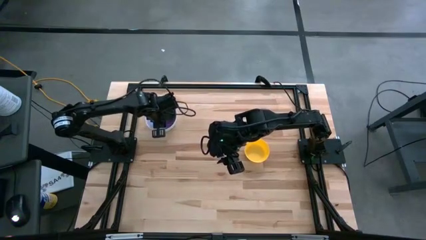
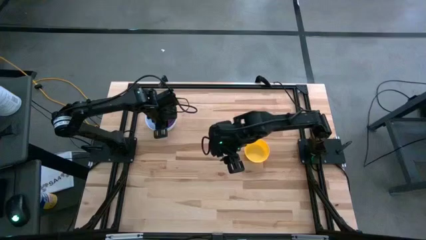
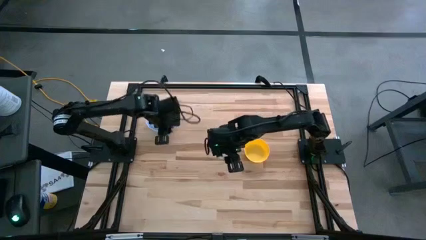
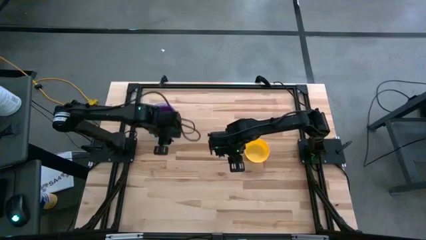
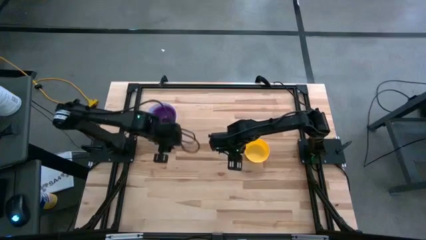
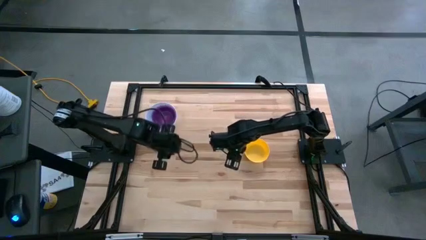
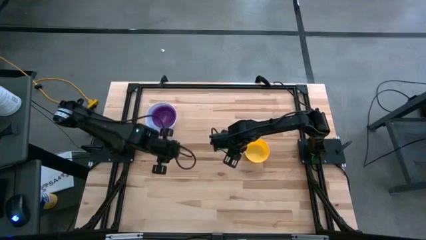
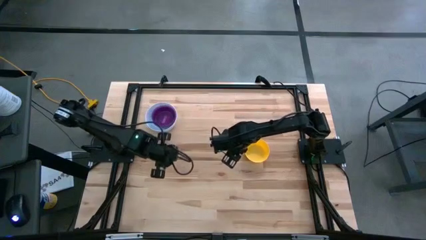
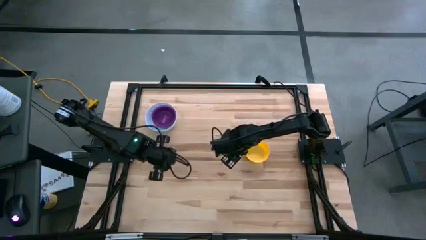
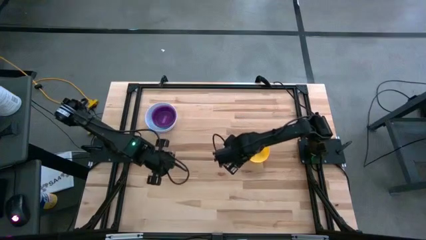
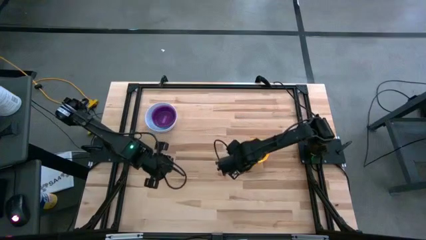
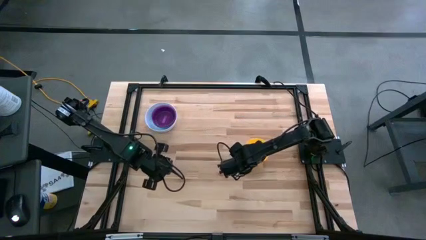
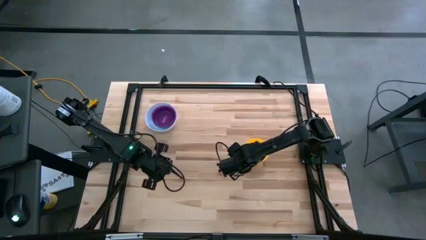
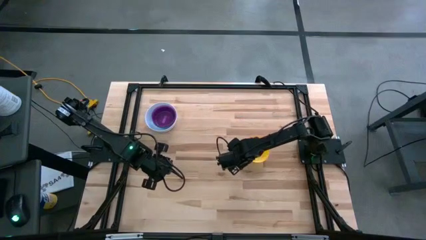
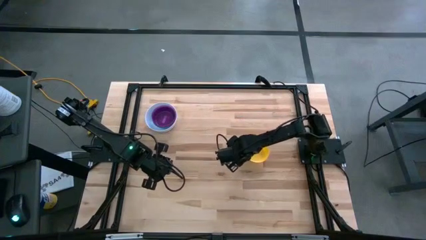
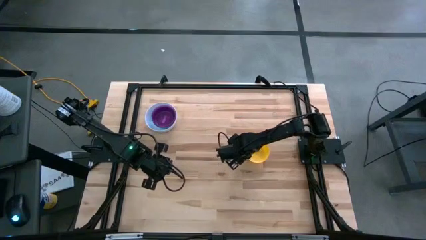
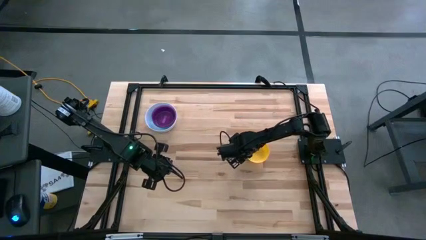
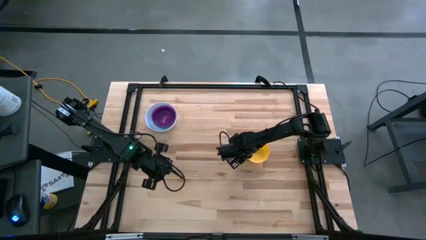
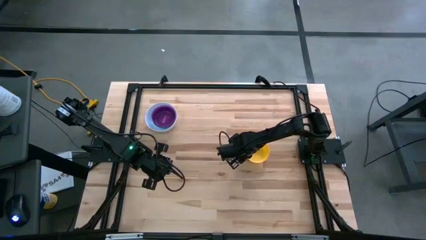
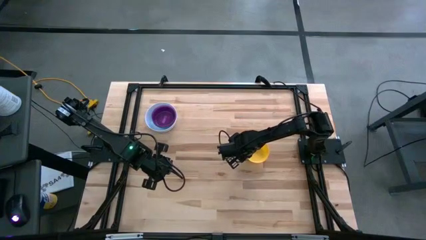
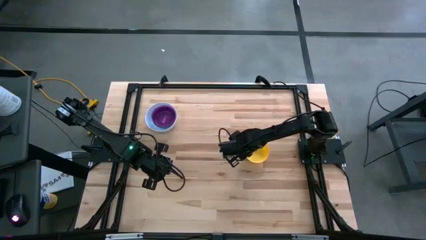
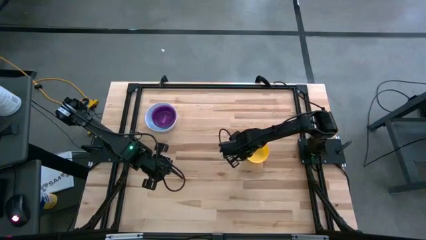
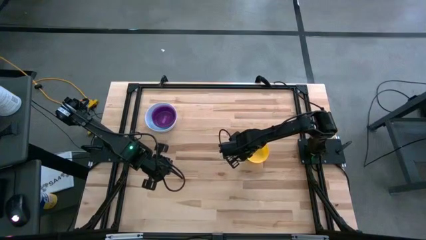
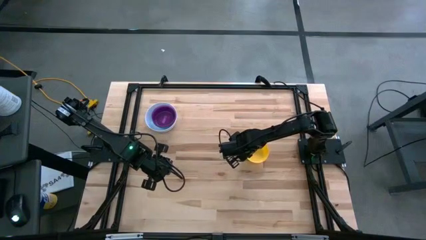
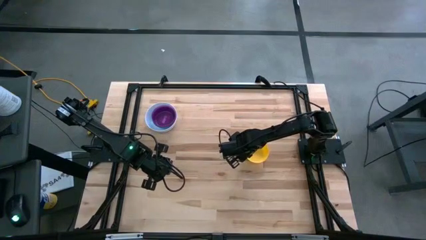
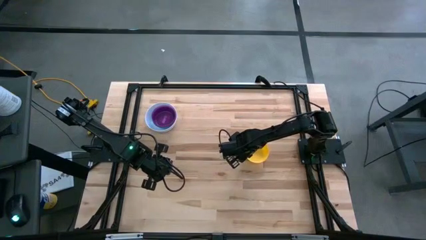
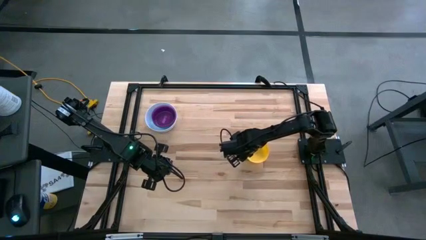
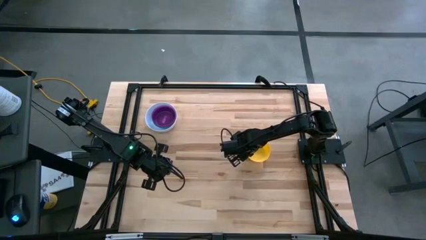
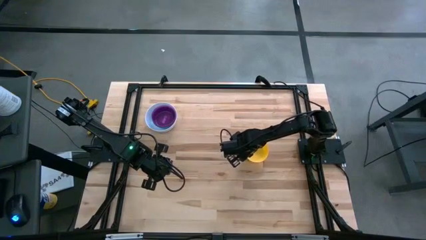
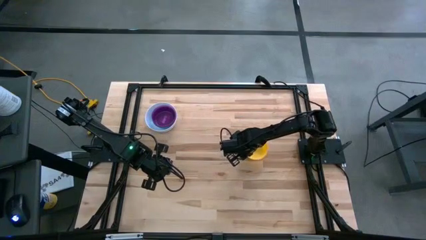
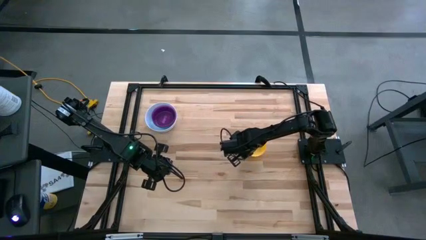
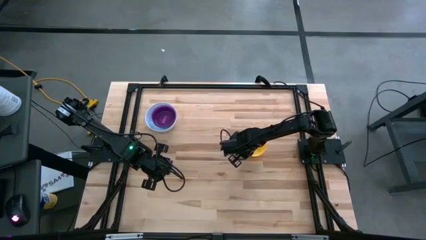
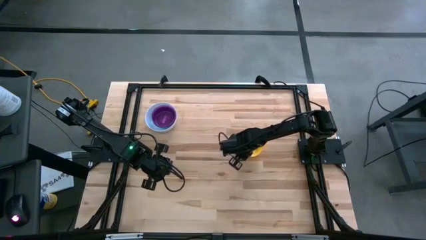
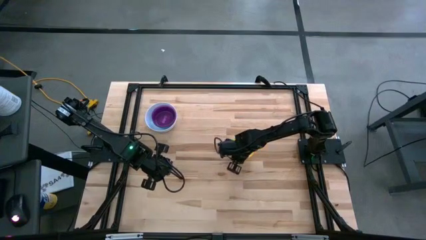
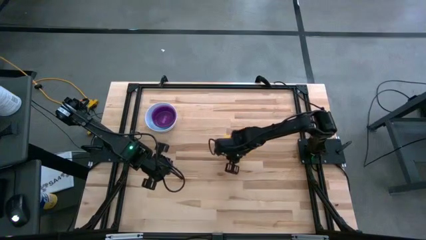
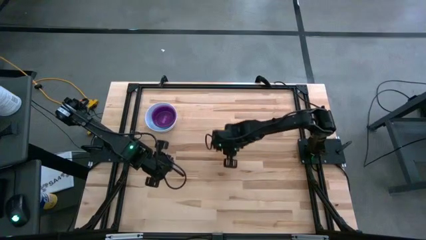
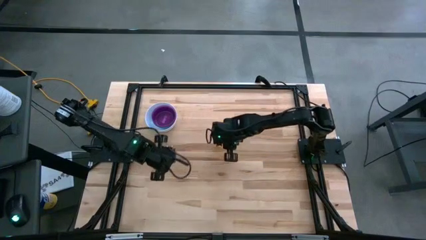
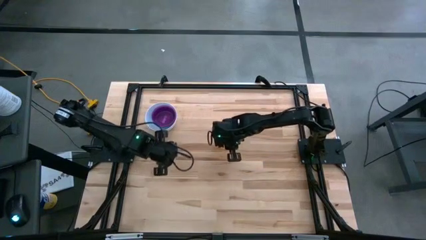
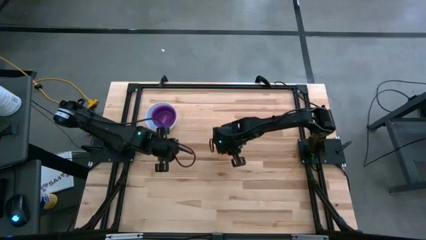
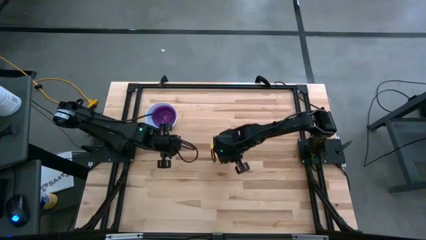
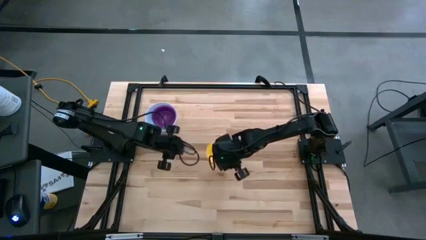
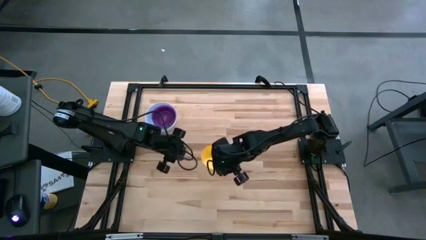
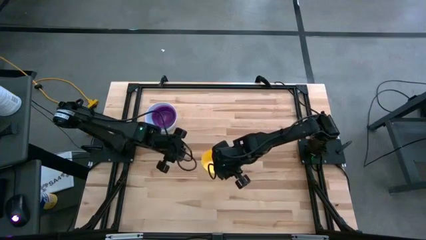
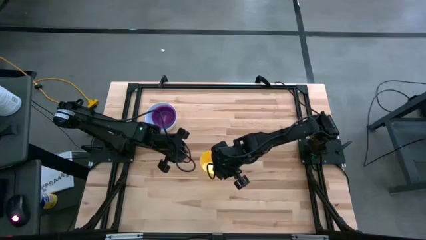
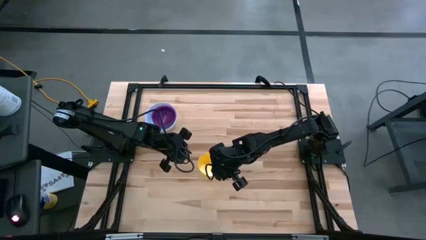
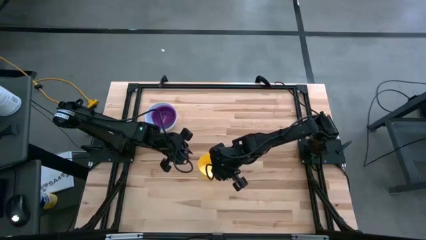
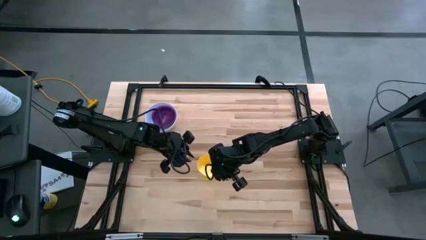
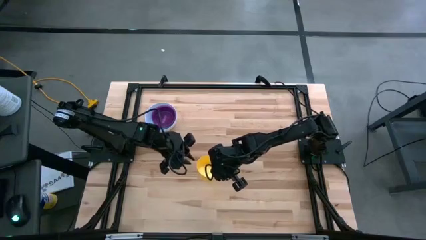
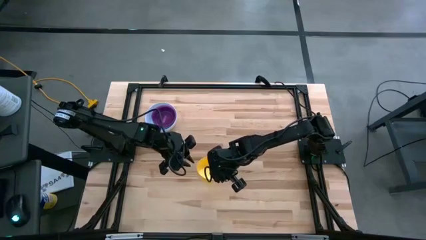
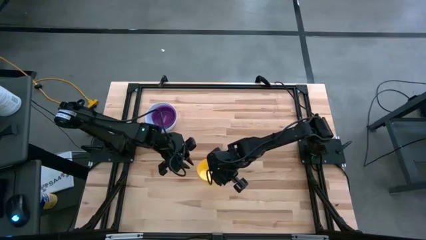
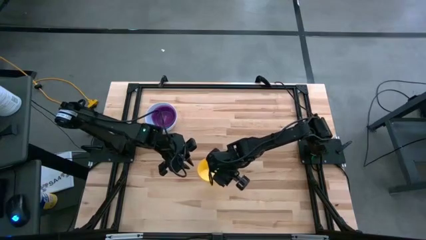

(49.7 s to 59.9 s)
Stack the yellow bowl on top of the violet bowl
